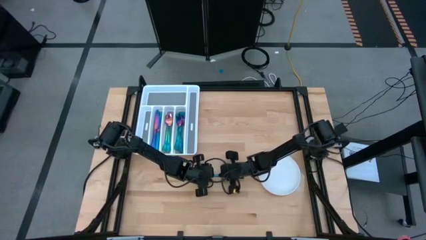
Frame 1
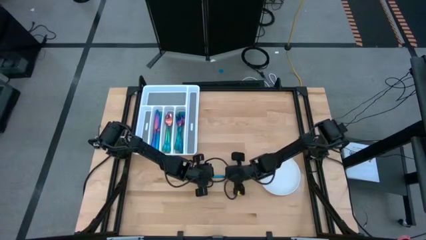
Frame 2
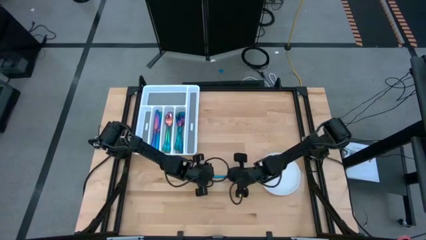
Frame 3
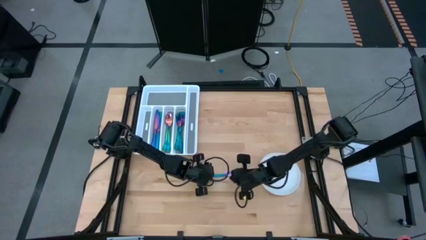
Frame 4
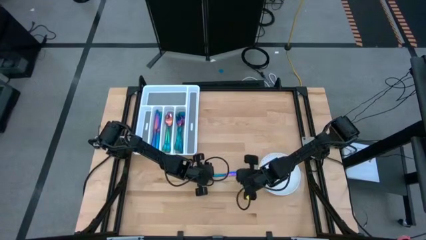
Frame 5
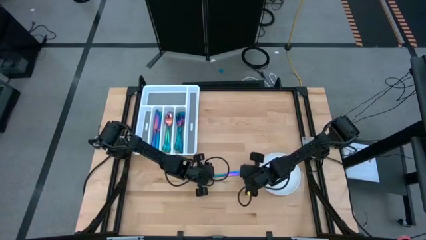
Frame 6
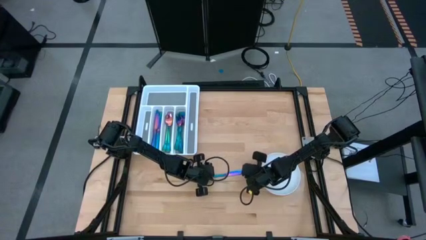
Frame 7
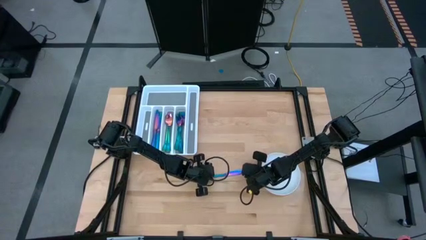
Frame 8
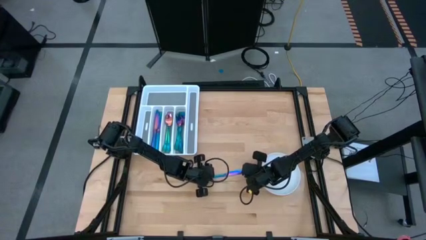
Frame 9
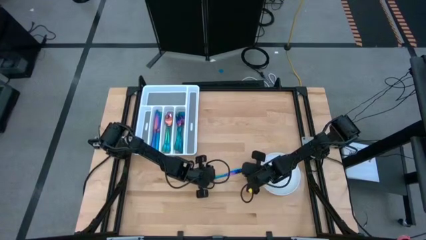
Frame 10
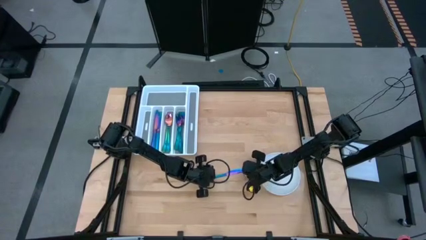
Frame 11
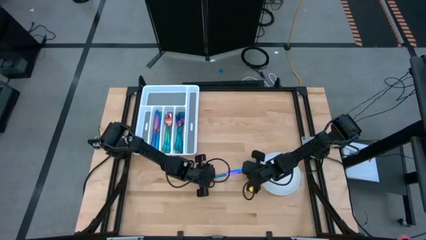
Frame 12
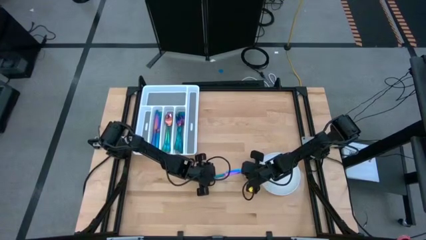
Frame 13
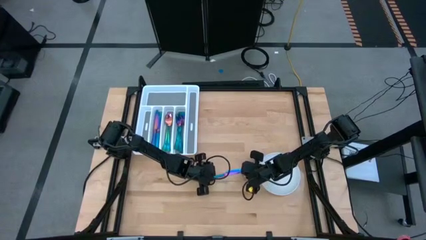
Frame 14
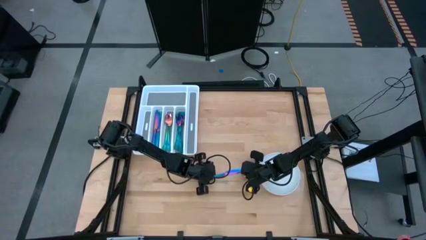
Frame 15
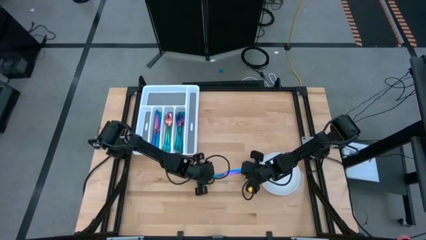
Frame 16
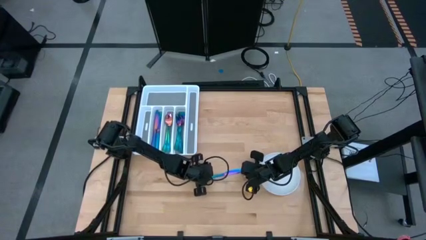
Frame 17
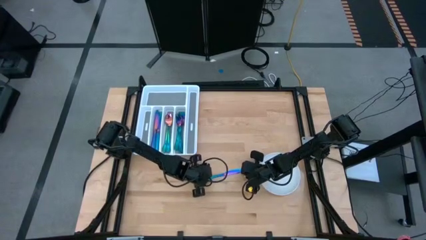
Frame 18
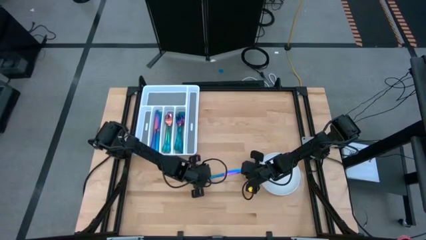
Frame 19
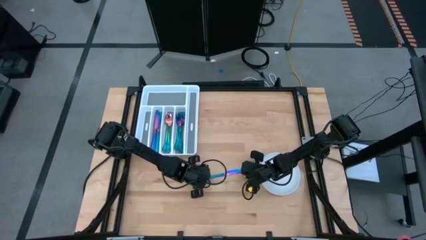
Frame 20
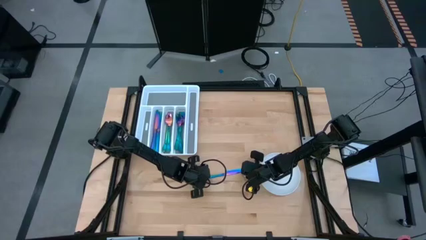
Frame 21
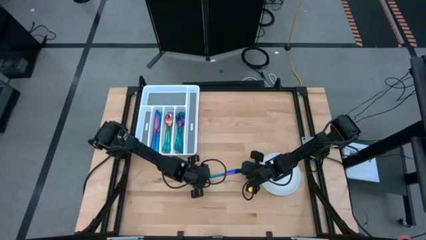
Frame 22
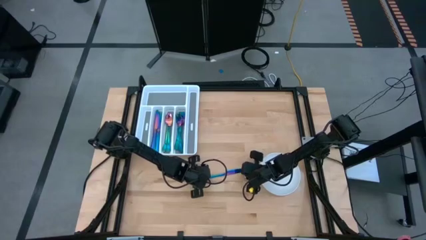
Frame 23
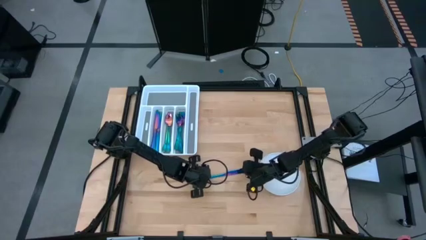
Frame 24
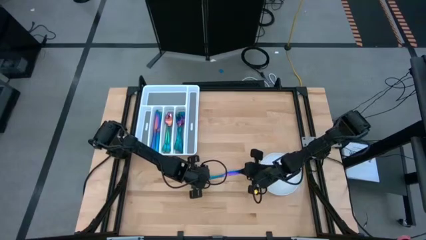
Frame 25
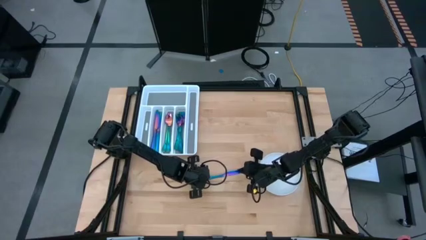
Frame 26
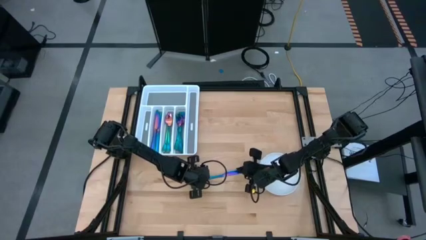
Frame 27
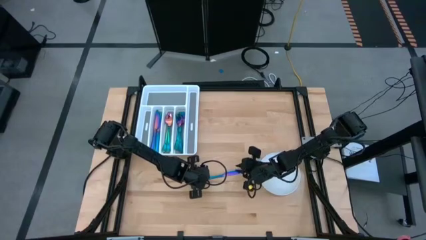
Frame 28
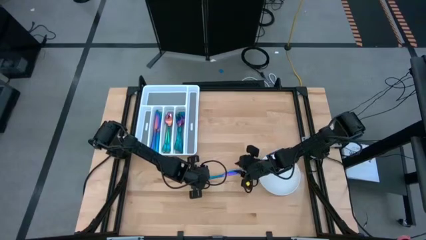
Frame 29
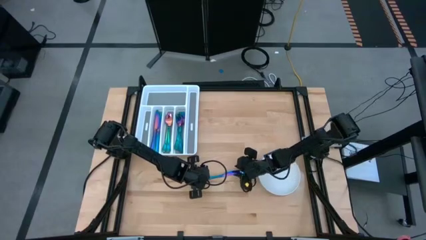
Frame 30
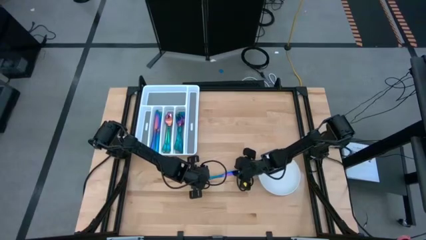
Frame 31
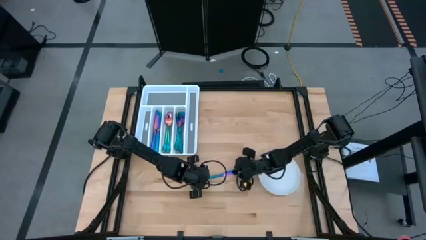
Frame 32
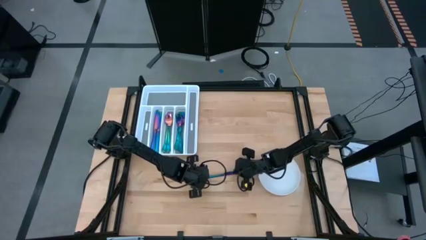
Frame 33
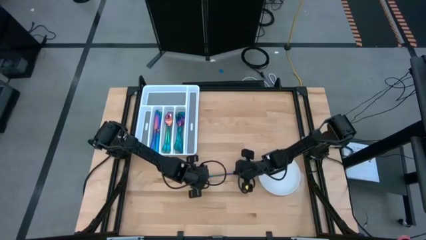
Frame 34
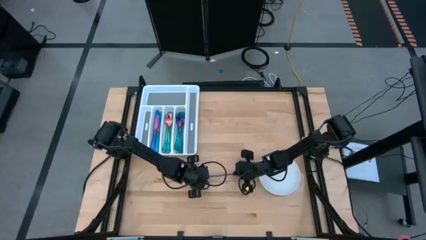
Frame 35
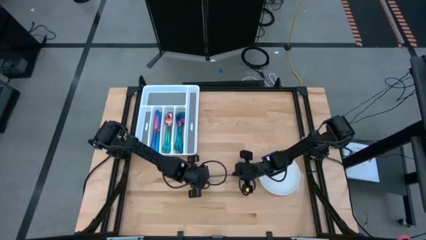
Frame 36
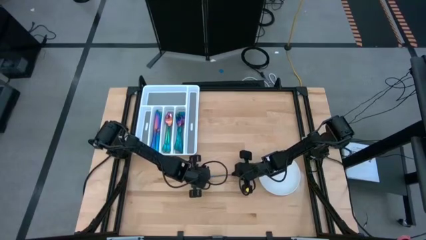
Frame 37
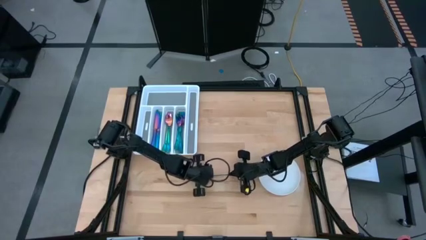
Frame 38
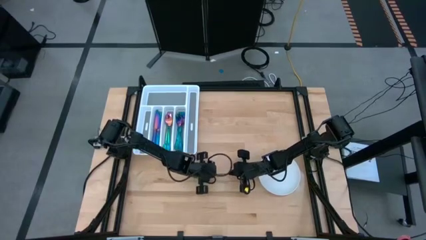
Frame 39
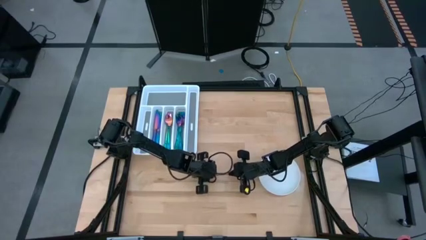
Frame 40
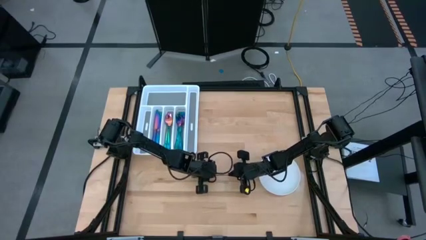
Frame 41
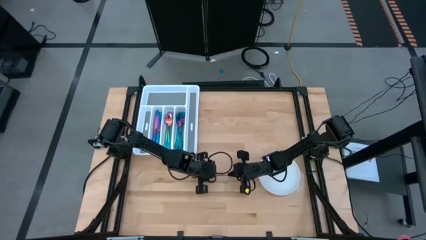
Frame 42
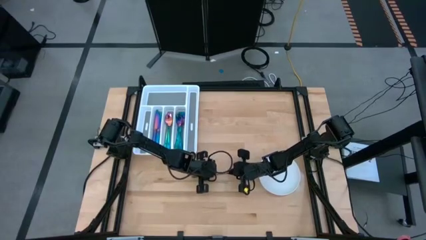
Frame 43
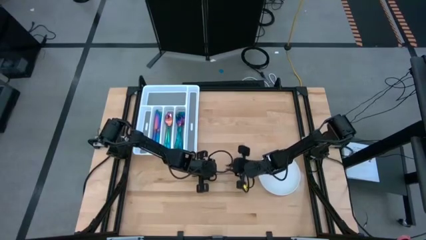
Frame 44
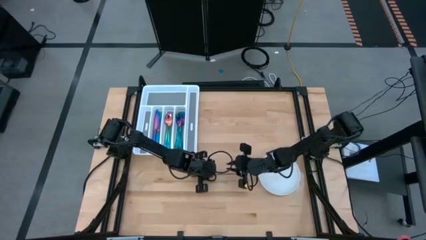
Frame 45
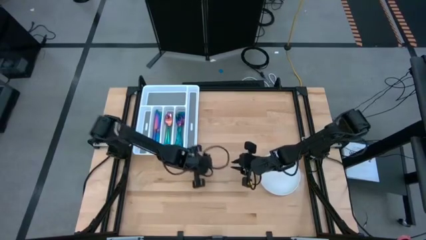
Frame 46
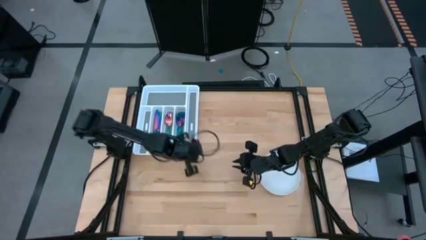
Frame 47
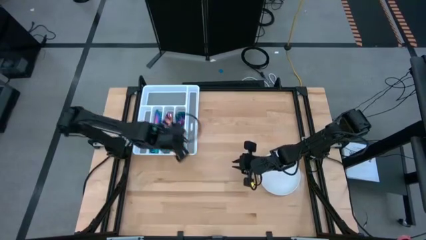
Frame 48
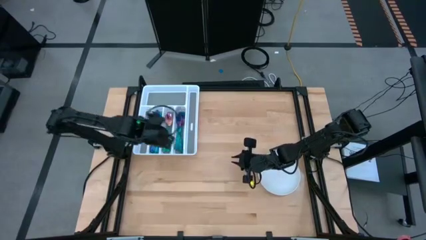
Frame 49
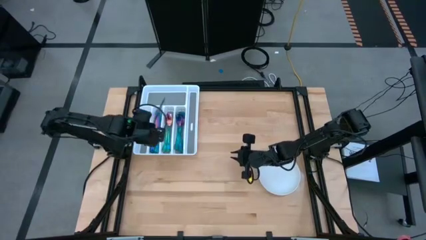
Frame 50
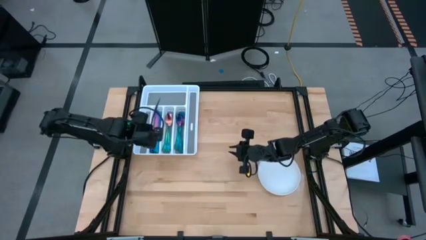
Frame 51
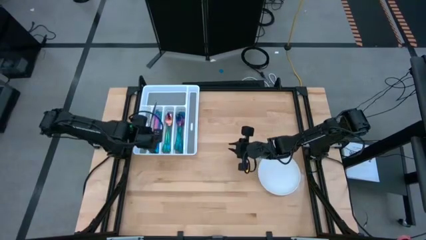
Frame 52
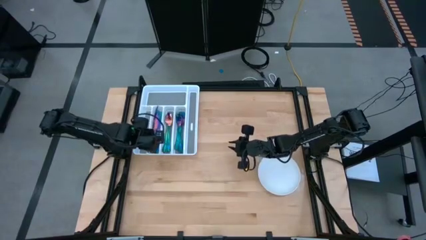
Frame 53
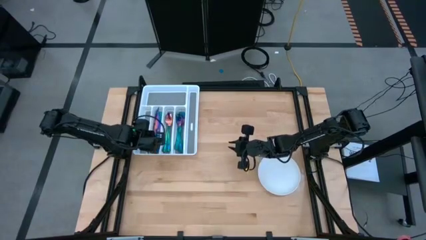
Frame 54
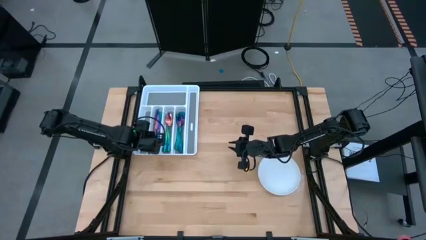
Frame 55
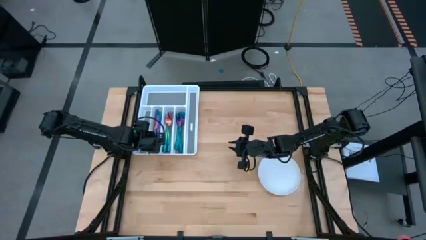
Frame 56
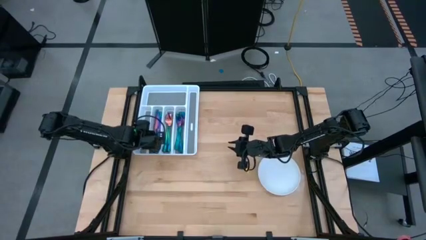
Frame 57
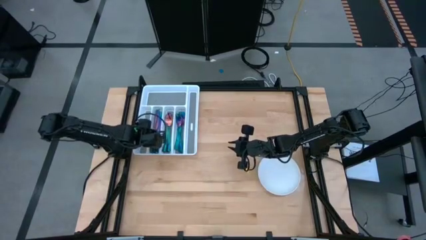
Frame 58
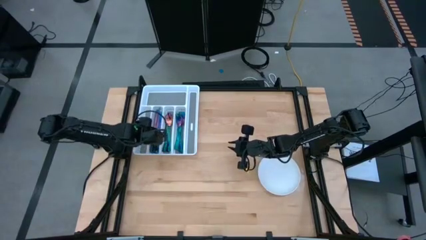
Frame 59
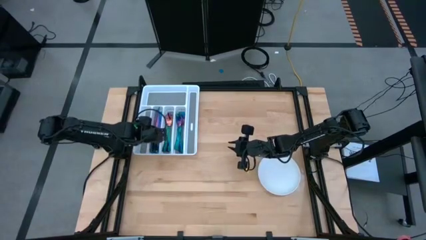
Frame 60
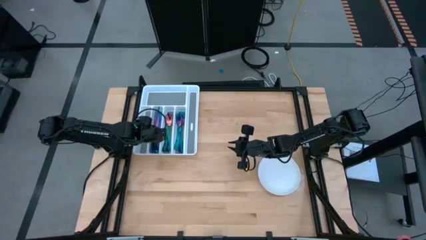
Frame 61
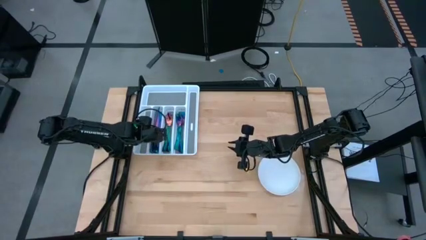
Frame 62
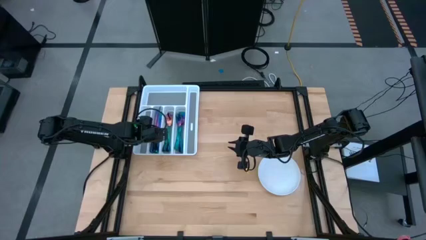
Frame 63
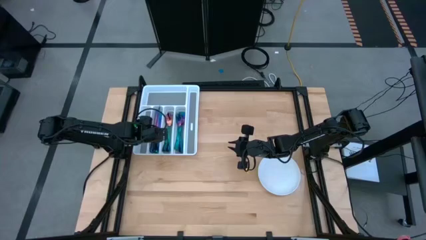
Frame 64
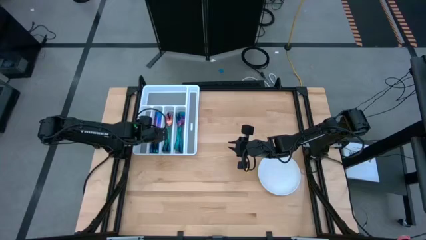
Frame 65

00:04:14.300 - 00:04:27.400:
Task: Sort silverware
Put the iridescent knife into the white silverware tray
